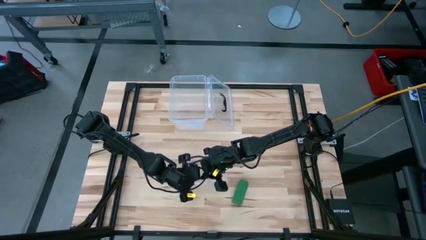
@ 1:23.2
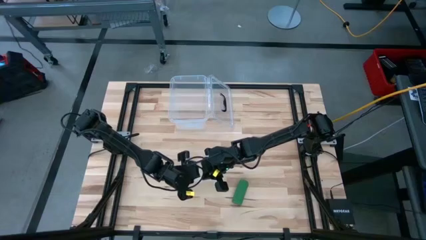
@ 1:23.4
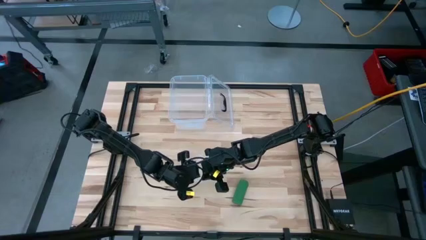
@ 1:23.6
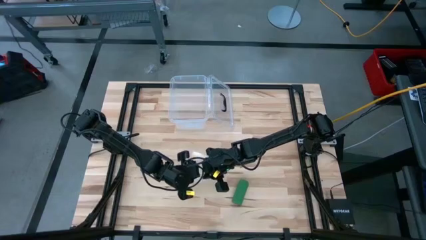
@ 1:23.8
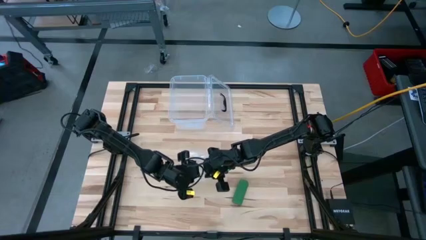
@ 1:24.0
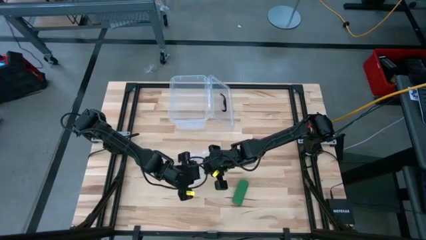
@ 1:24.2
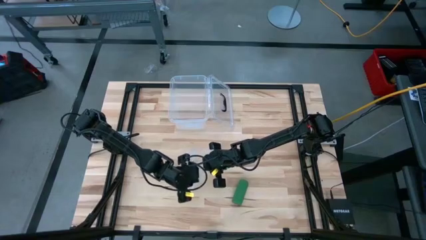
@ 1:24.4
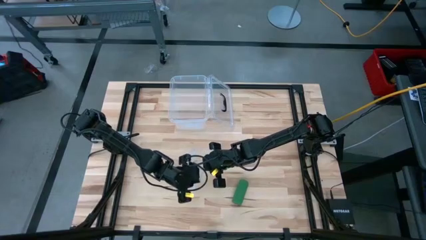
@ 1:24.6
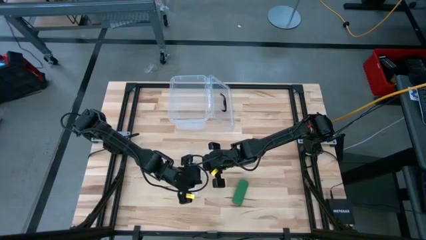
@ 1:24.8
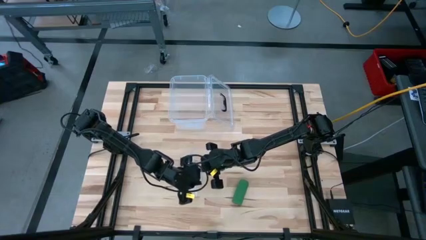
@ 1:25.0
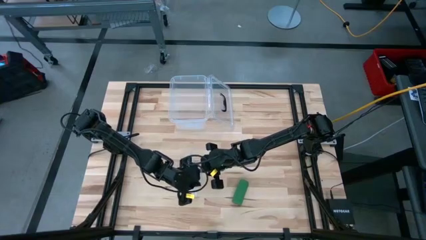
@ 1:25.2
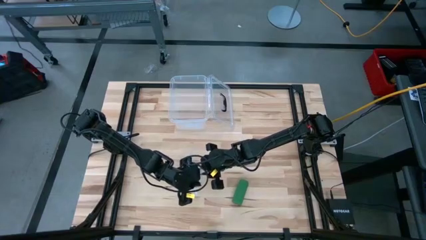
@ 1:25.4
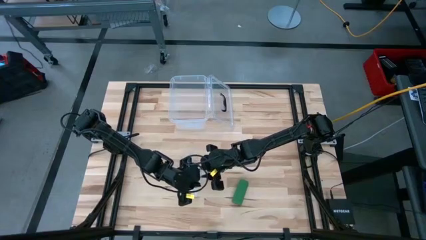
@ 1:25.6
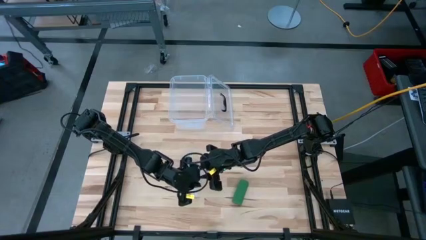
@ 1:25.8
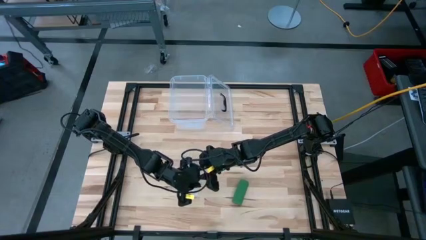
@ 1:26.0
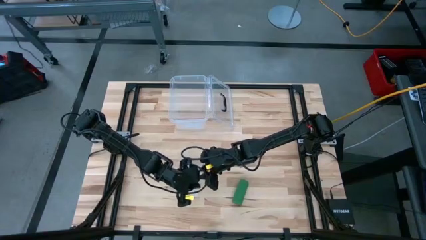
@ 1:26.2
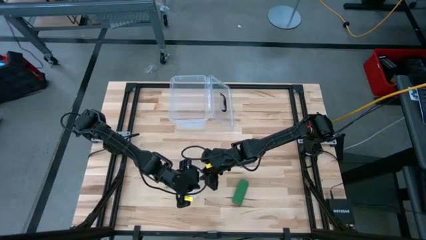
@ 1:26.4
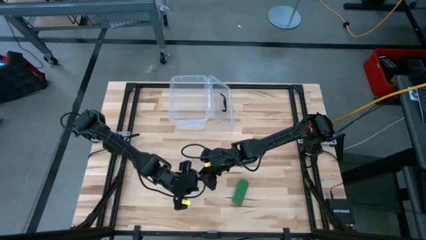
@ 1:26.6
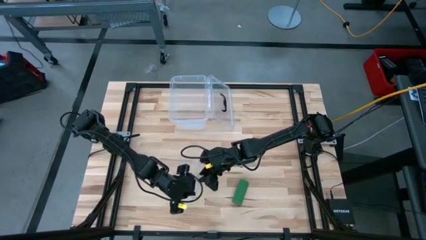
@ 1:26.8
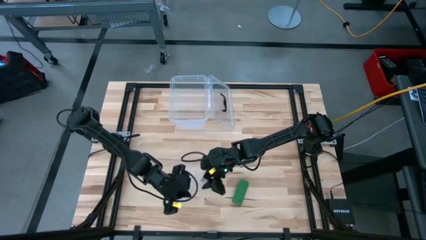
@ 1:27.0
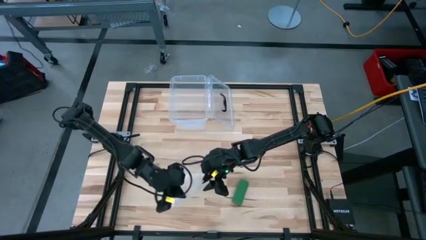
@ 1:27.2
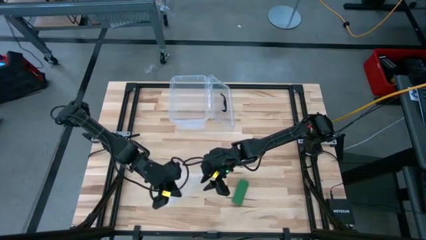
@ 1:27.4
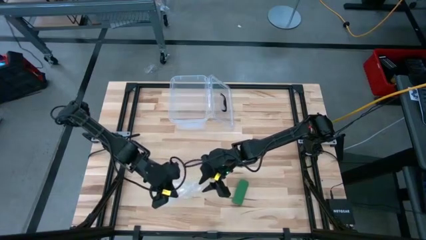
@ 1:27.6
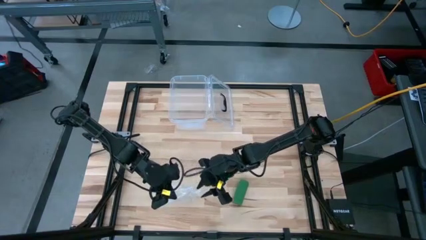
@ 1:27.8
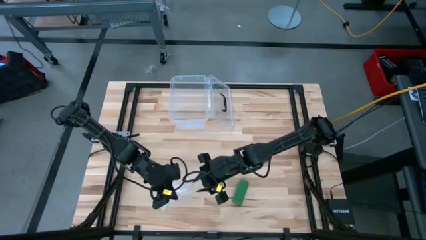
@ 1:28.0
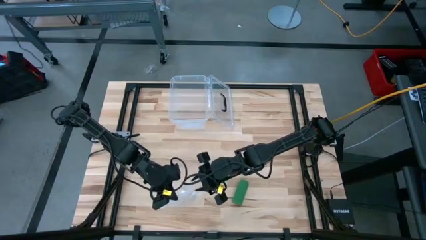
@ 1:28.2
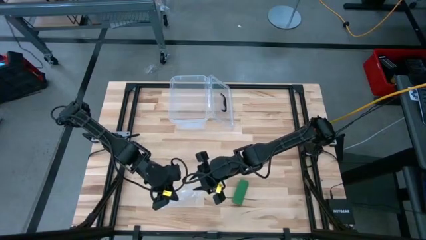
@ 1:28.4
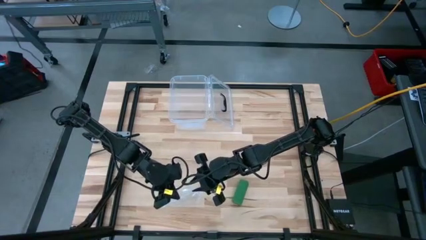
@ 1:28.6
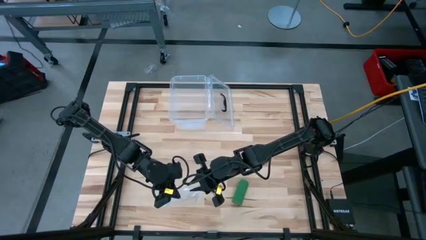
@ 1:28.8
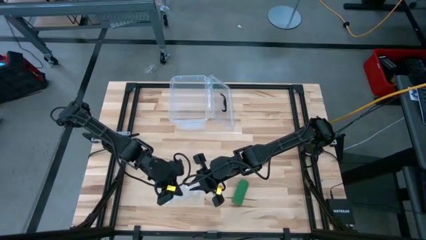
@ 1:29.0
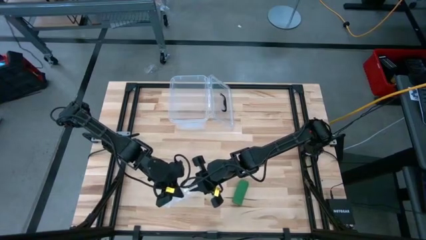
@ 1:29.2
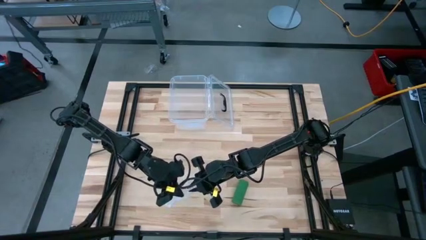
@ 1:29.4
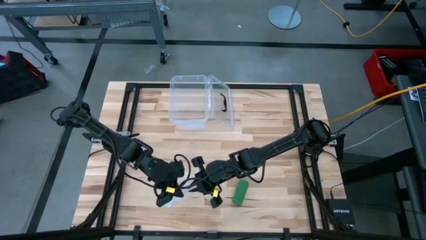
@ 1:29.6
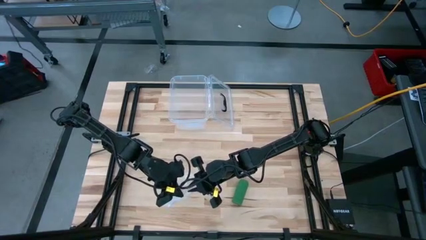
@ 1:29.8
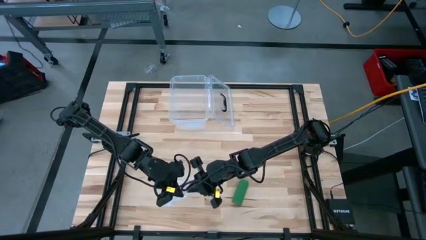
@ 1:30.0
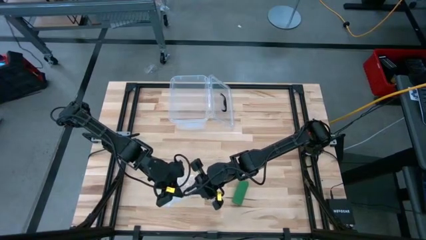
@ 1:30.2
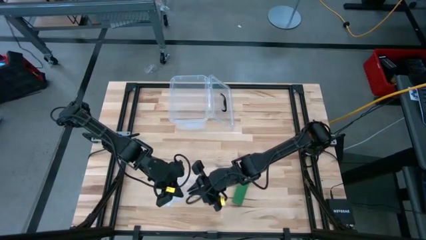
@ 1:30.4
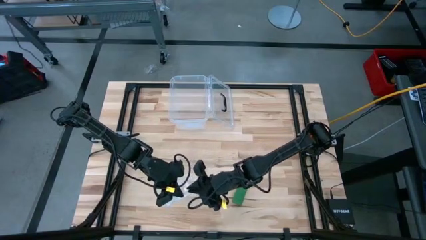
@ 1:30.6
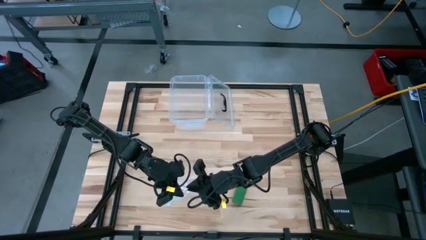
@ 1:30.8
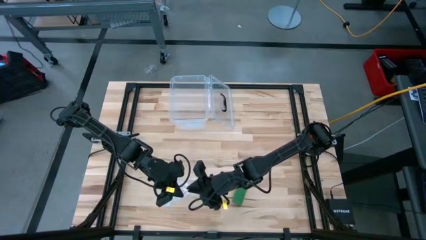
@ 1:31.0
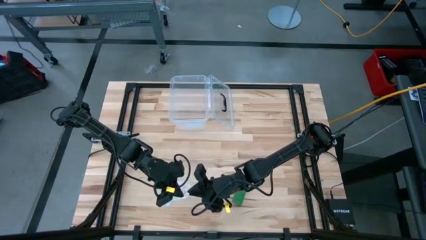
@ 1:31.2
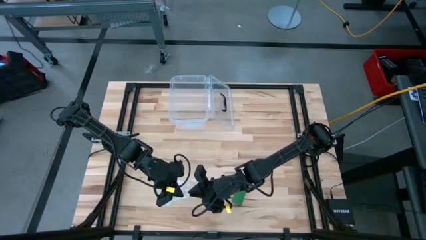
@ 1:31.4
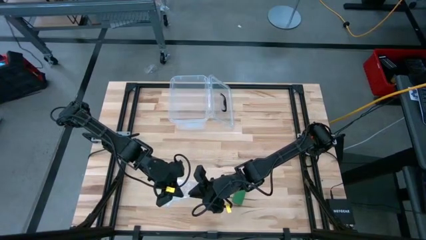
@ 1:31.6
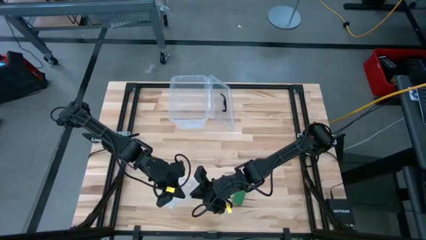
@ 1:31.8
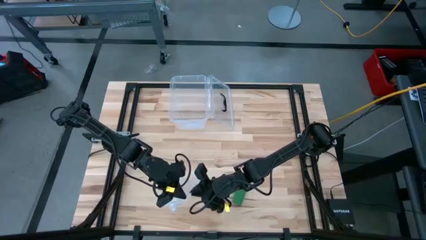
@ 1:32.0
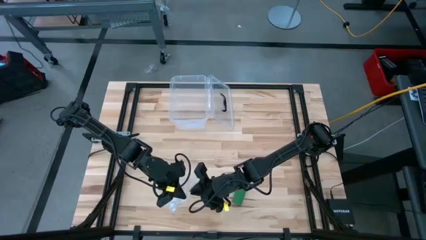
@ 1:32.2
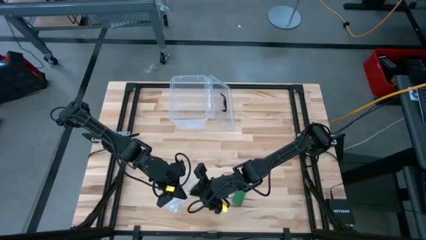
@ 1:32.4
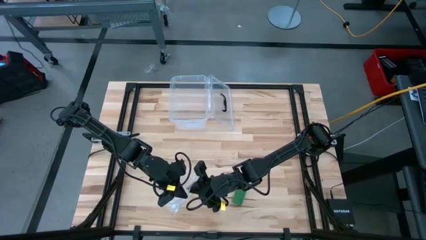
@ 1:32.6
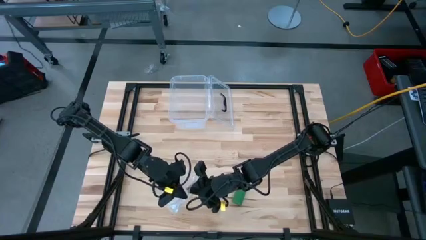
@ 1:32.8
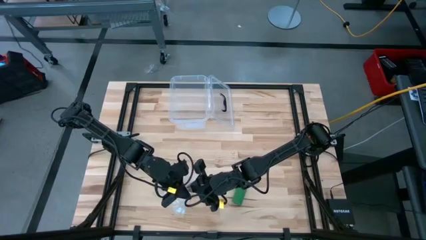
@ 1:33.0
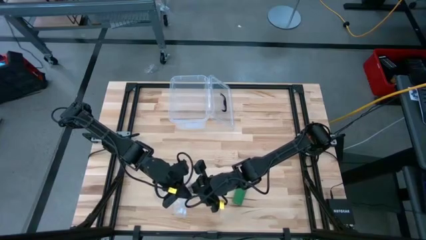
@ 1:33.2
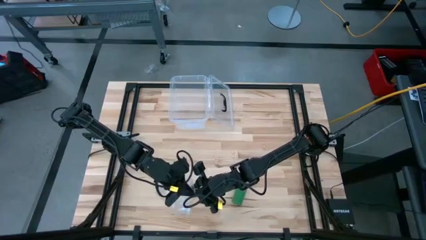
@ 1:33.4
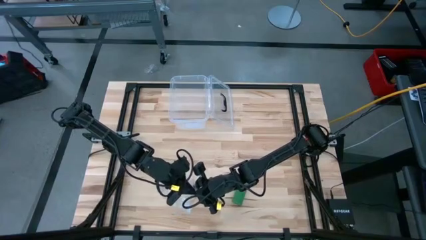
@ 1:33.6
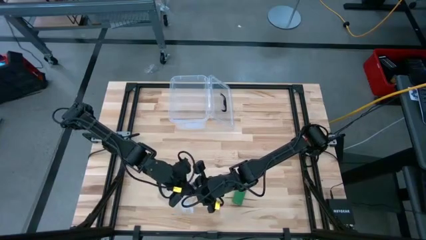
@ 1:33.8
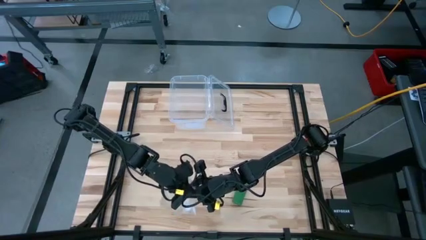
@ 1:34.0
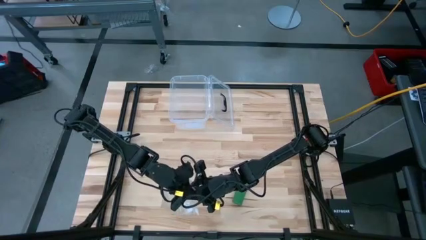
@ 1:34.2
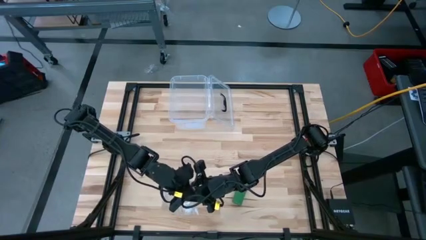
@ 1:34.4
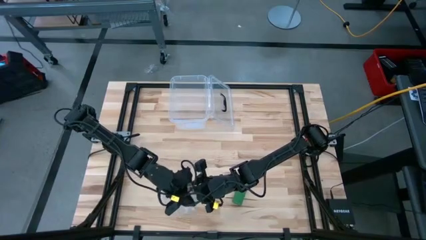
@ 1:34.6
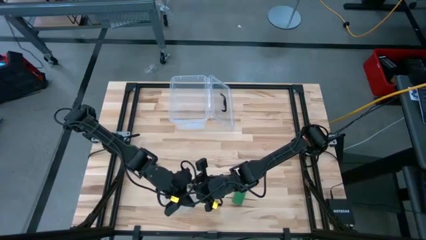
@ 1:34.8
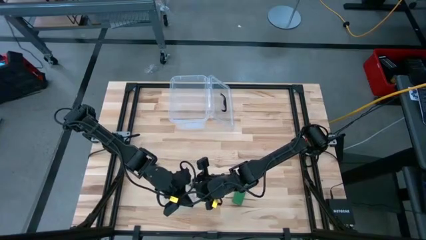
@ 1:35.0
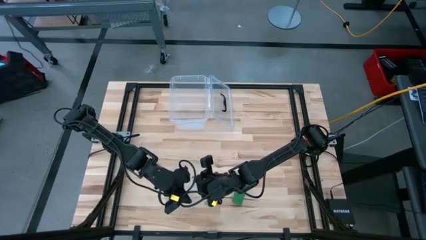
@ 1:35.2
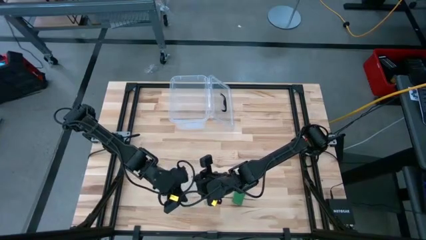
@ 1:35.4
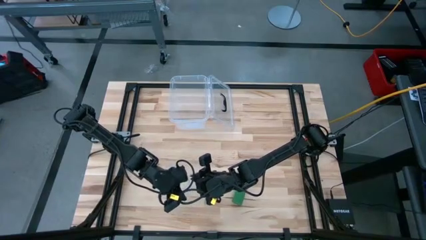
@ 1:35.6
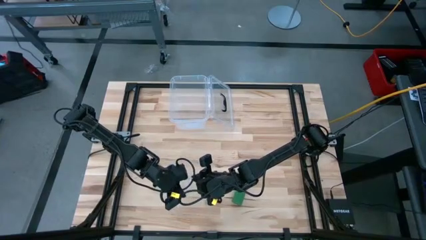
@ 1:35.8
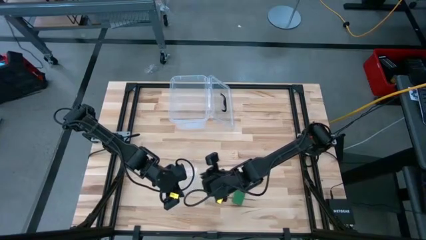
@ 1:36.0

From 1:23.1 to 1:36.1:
Task: Roll bandage
Prepare the transparent zip bag

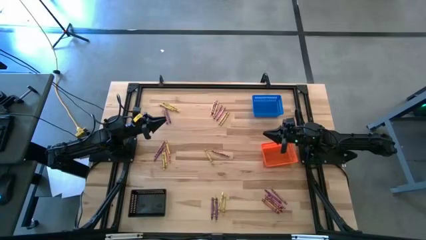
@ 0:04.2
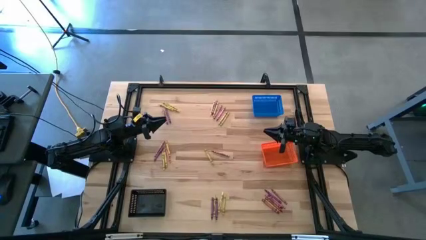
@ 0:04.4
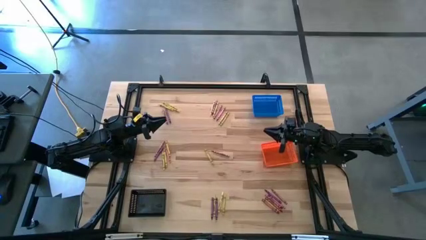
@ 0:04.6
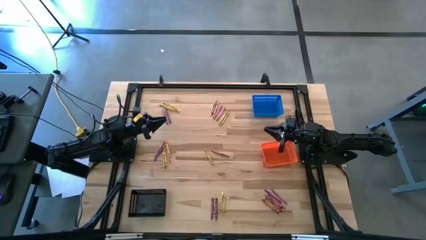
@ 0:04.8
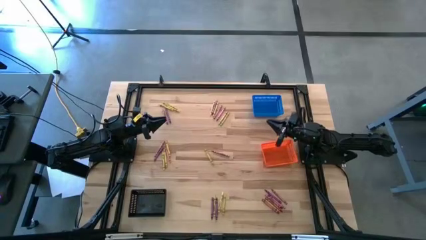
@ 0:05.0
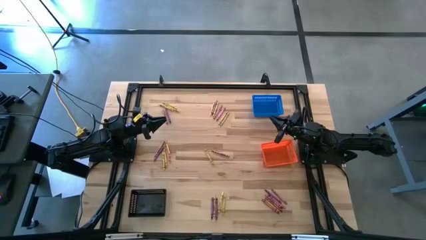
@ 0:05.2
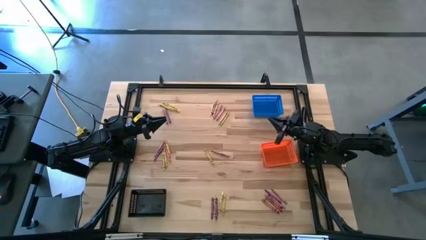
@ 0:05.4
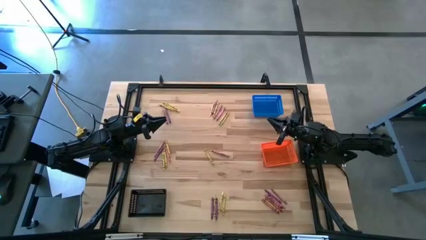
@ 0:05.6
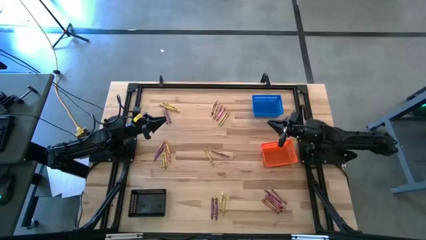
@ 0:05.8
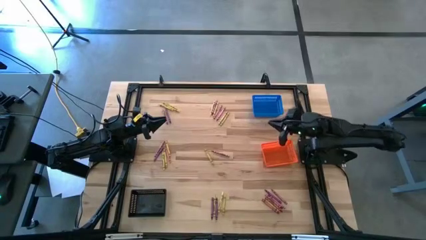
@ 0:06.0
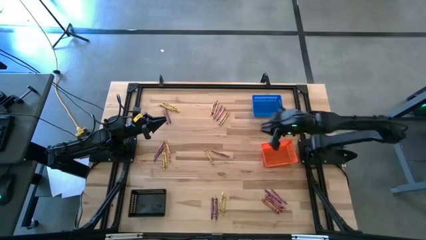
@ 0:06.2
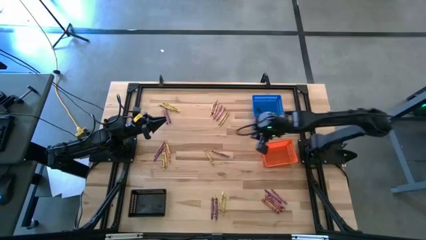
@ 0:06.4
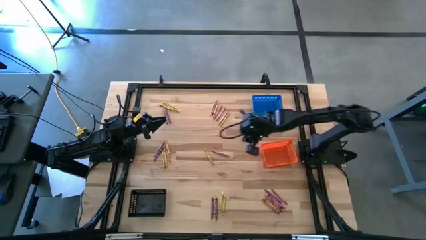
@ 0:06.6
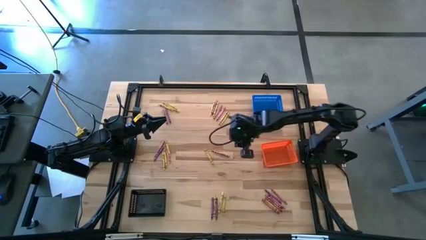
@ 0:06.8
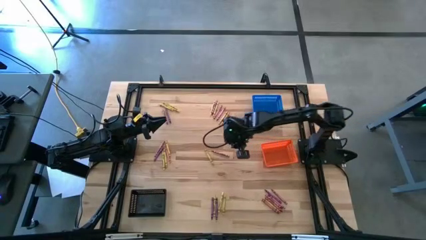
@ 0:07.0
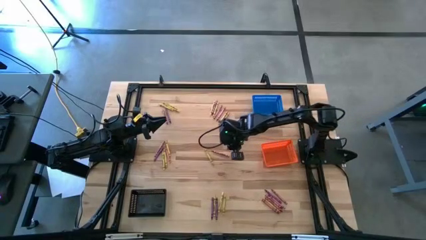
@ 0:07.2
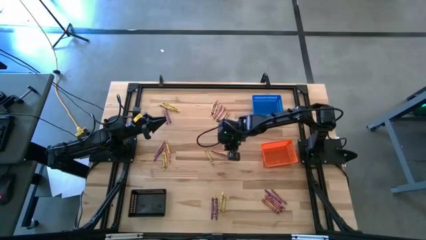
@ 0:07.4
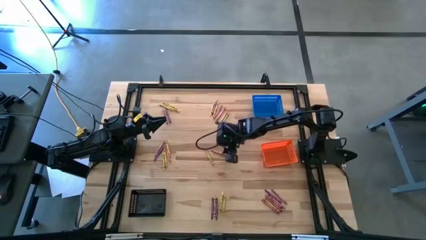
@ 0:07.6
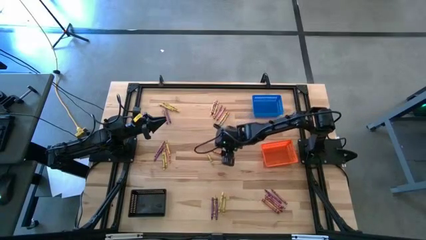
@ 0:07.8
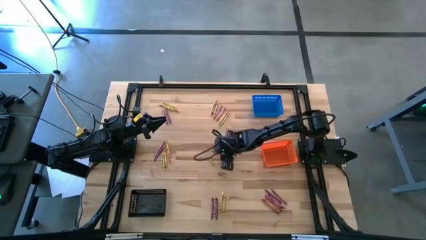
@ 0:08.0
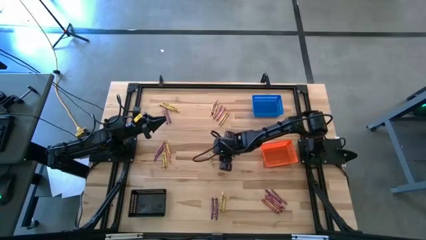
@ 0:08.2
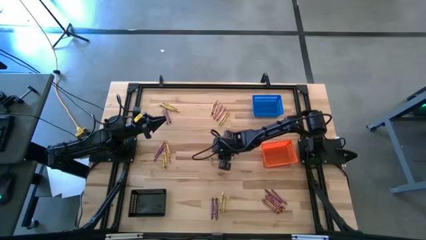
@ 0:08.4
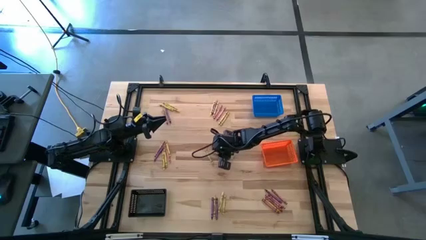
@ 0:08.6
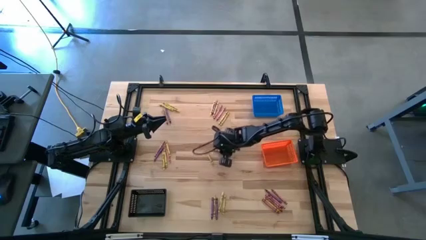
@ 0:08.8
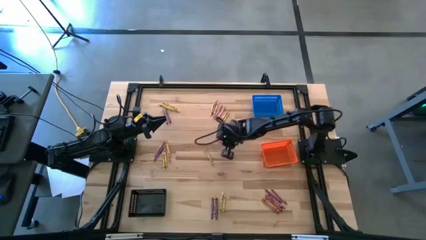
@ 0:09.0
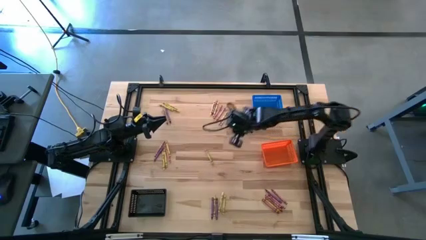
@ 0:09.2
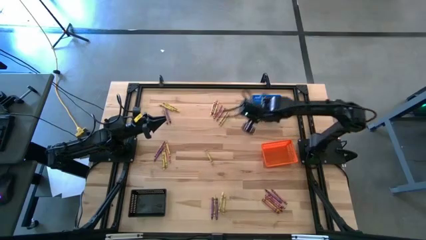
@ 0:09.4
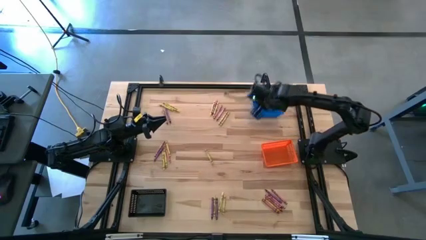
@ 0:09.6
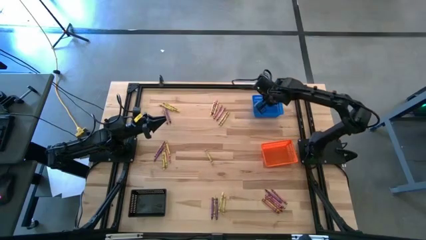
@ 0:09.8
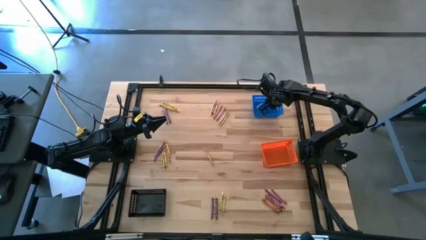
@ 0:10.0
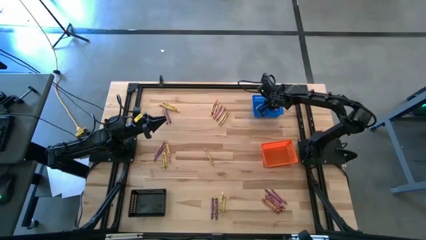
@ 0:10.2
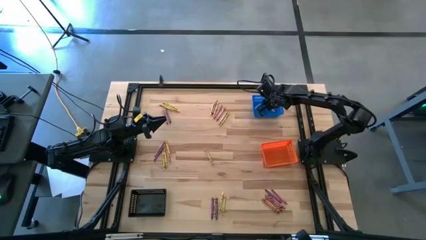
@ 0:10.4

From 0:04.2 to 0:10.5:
Task: Sort crayons
Put the red crayon into the blue basket
